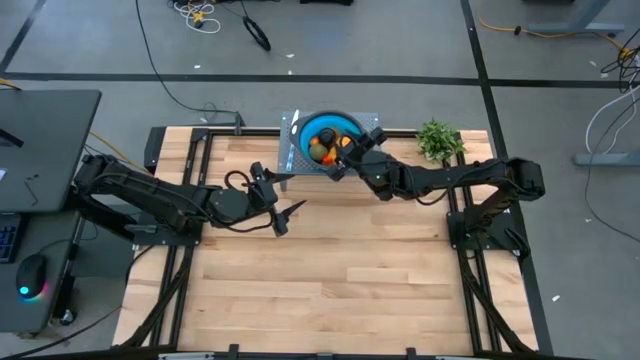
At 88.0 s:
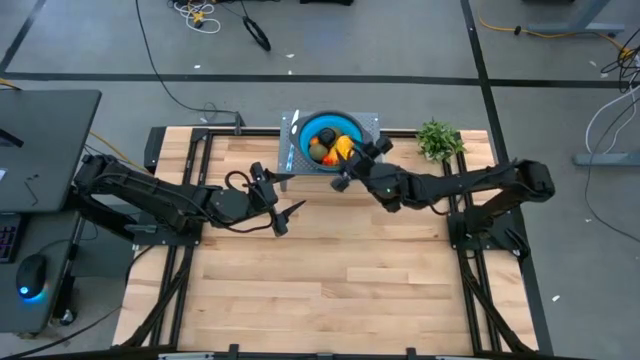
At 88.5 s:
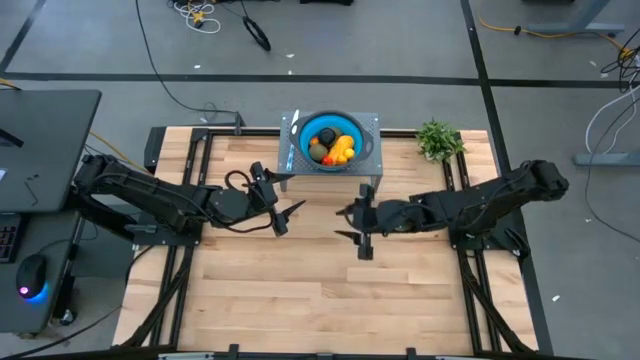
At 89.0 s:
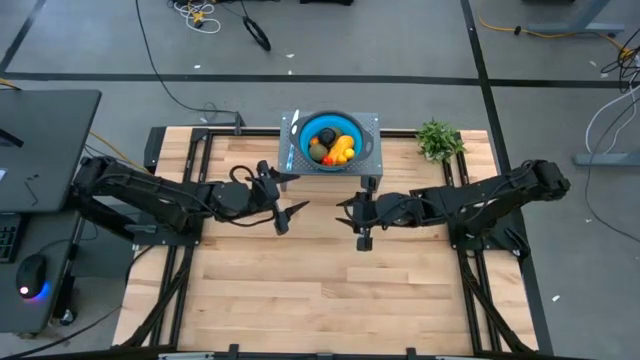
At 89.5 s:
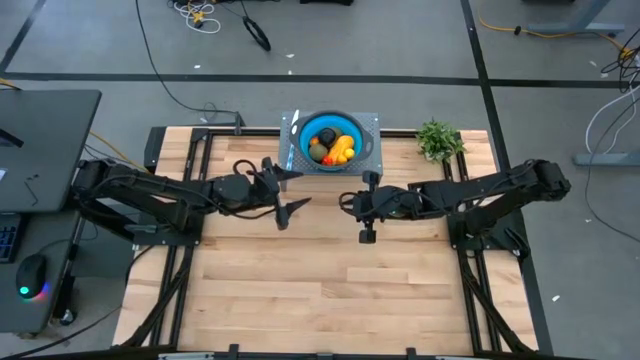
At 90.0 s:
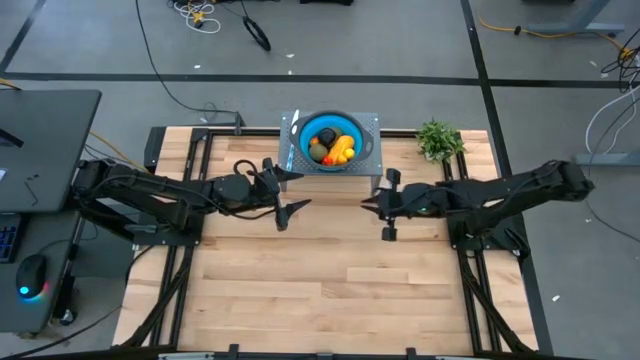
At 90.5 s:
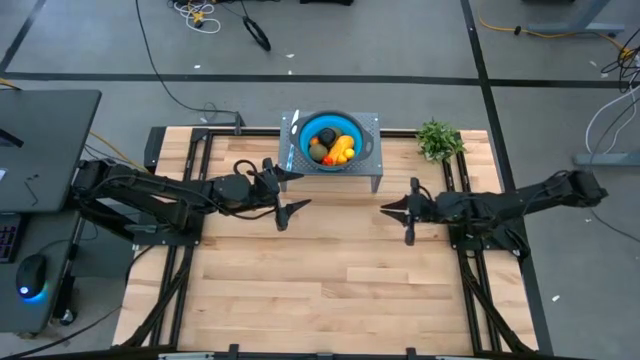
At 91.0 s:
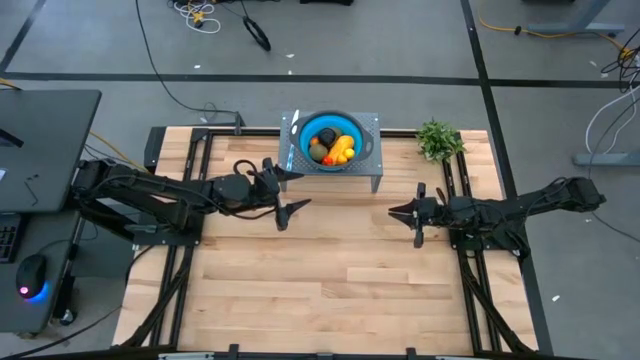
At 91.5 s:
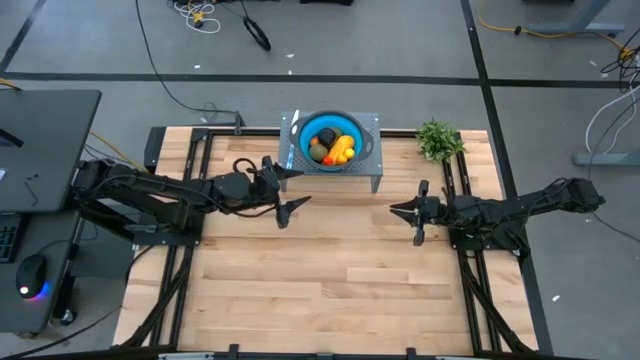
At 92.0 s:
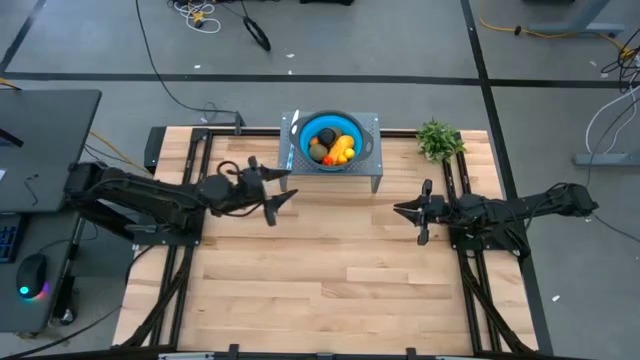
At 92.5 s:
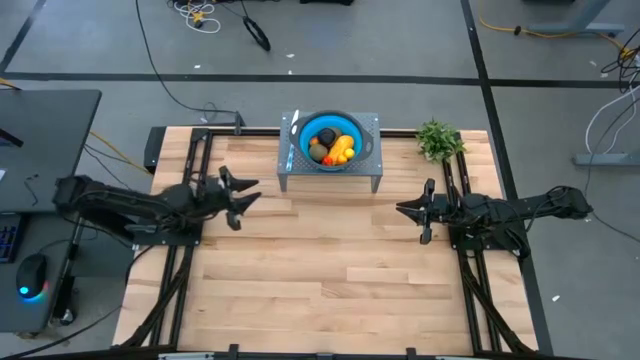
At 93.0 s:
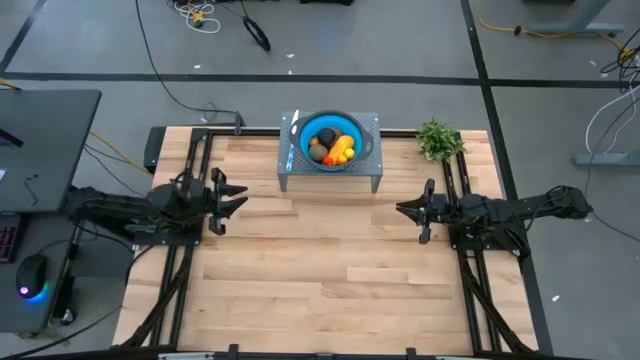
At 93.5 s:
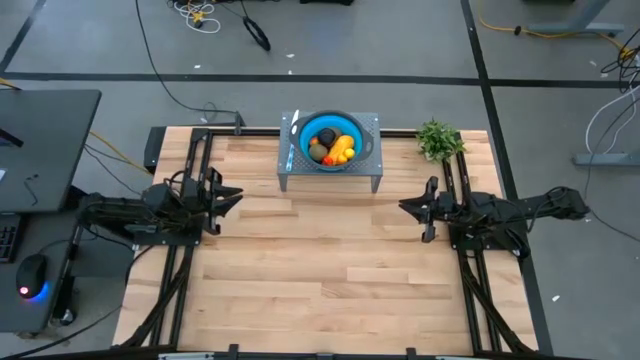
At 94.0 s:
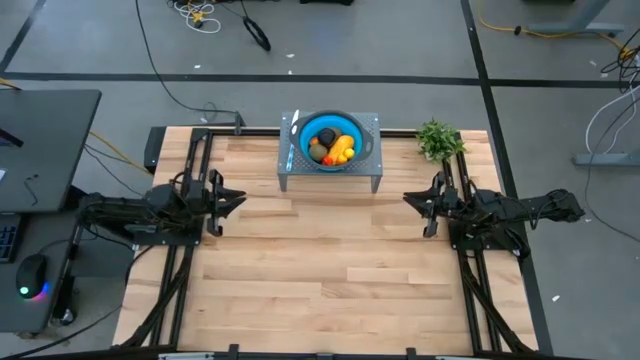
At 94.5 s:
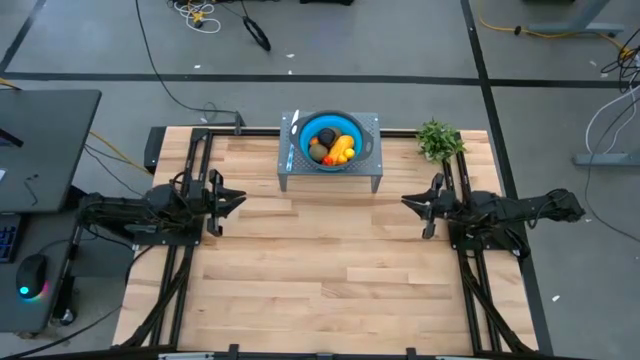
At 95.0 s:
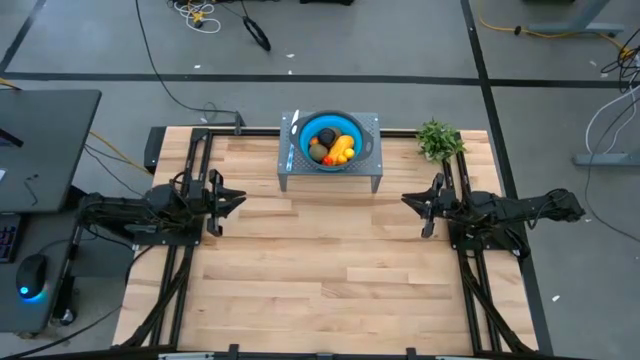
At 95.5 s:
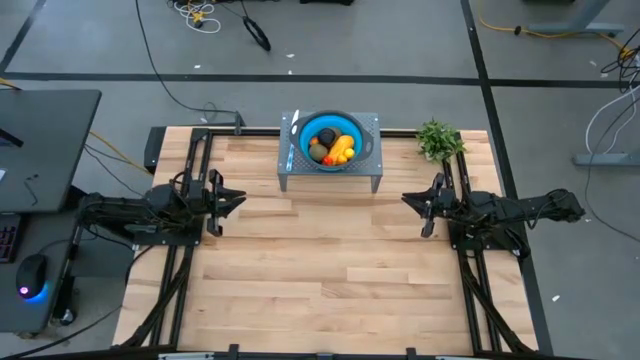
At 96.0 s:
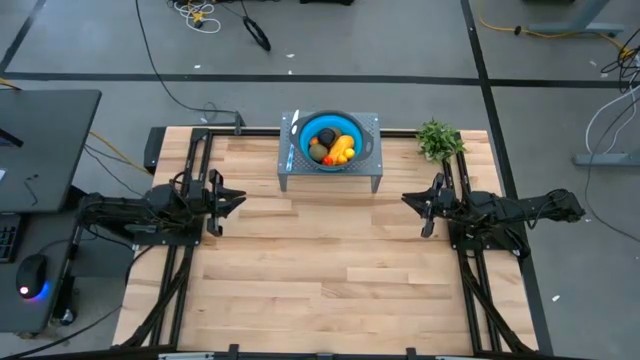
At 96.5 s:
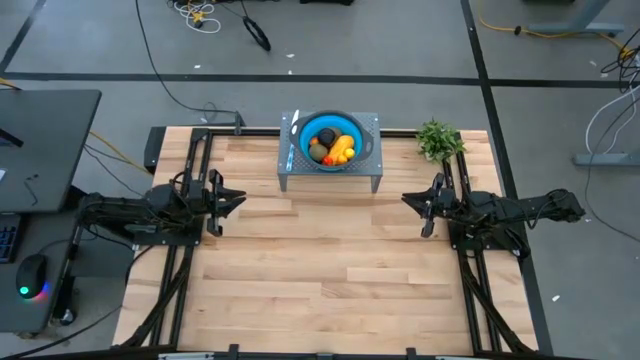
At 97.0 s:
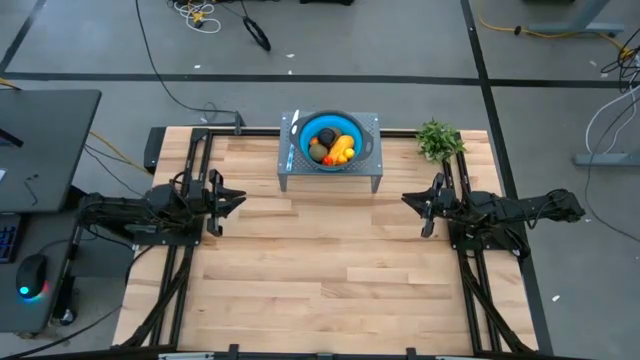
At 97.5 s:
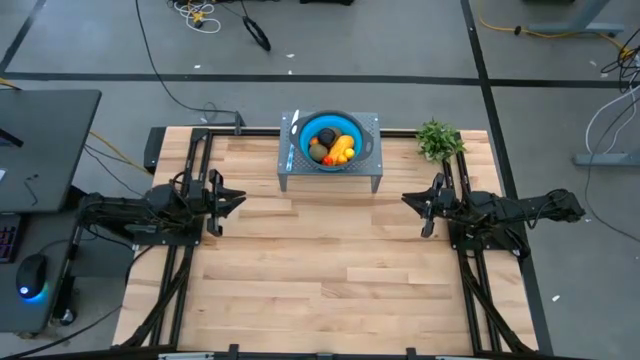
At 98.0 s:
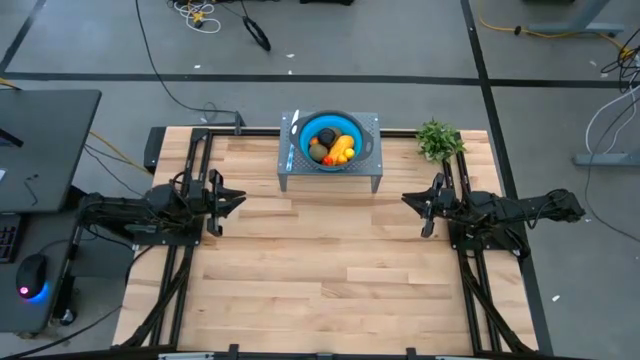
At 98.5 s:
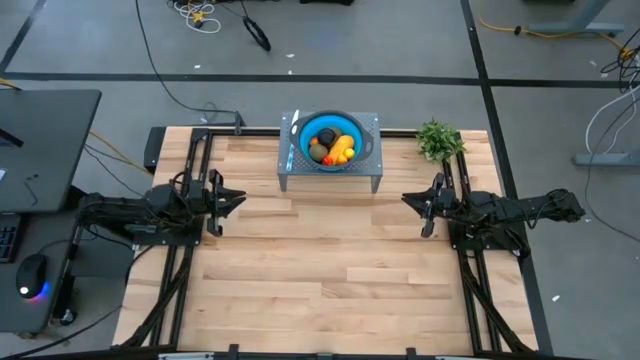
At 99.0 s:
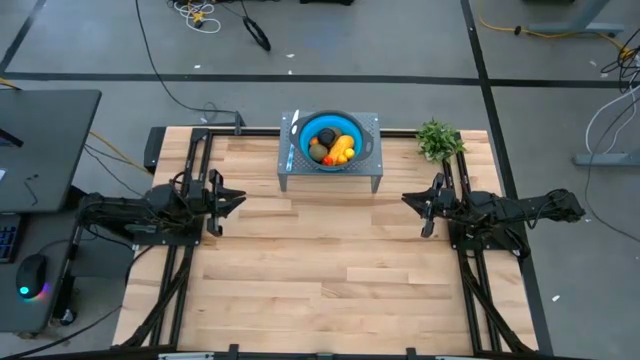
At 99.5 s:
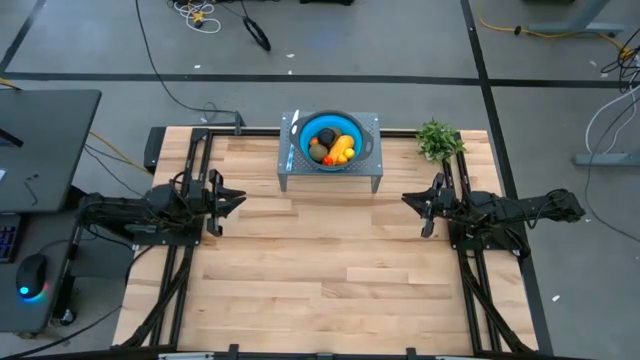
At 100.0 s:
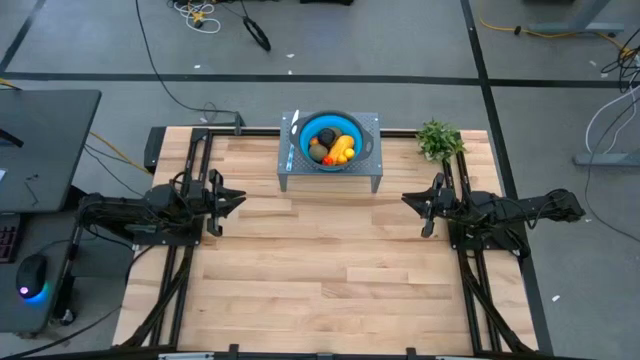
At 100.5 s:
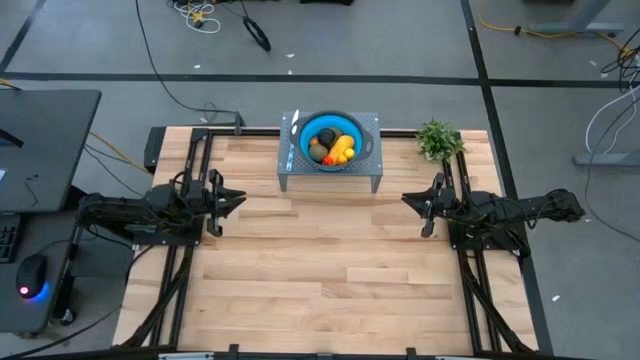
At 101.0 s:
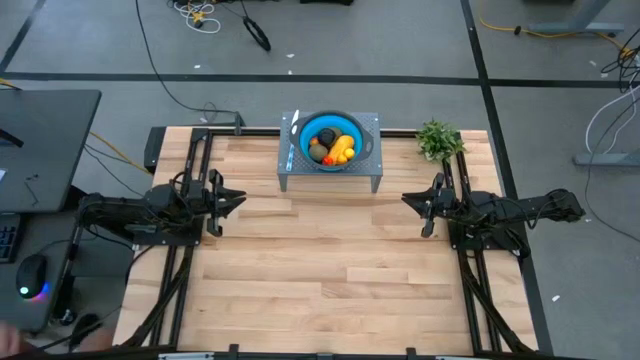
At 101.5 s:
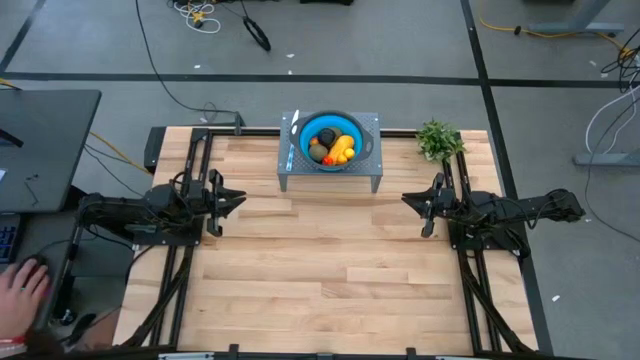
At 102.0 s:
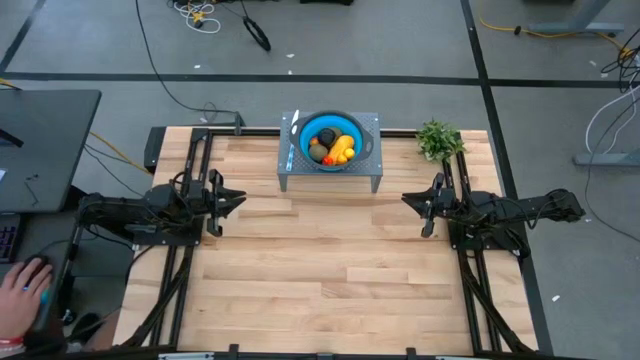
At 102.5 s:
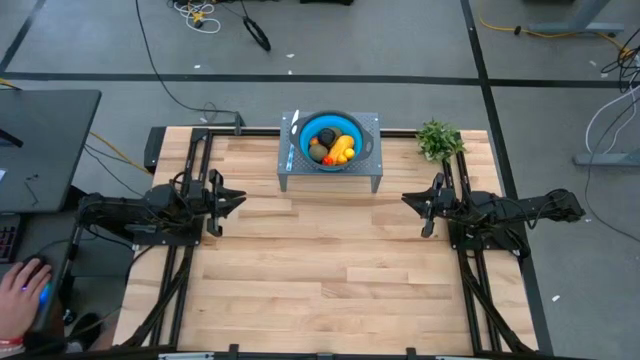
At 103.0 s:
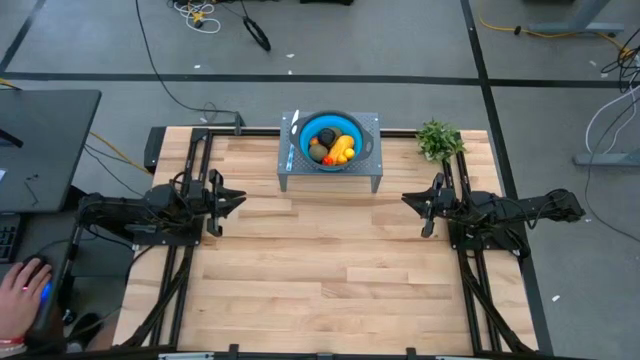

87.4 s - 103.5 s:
Task: Pick & Place Fruit
Return to Home Position
